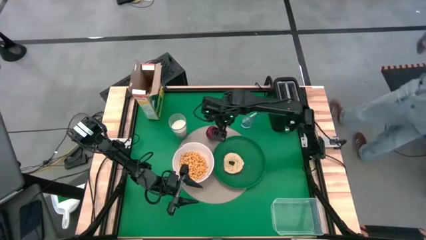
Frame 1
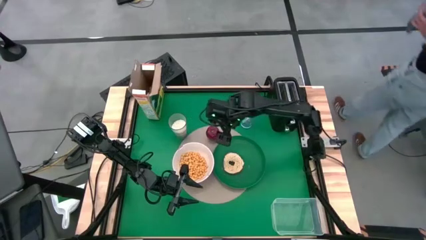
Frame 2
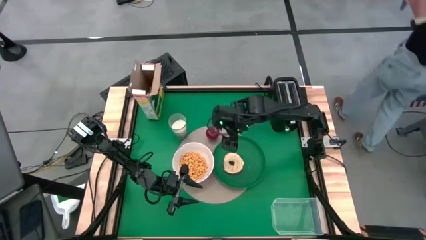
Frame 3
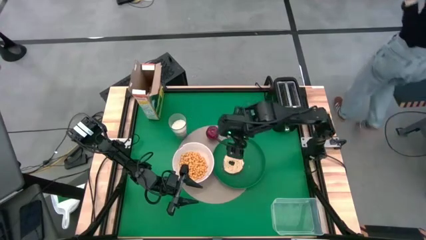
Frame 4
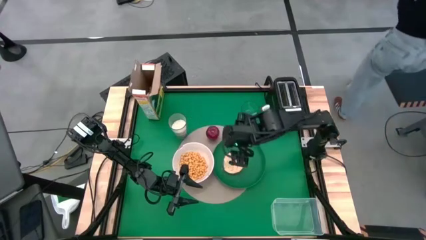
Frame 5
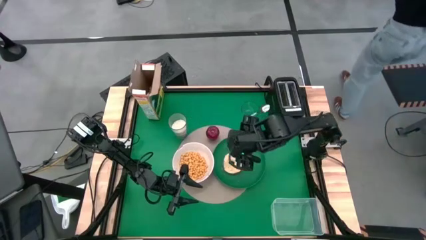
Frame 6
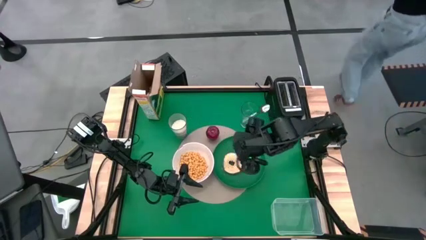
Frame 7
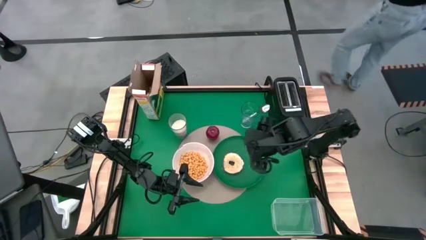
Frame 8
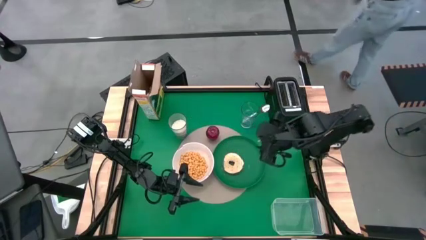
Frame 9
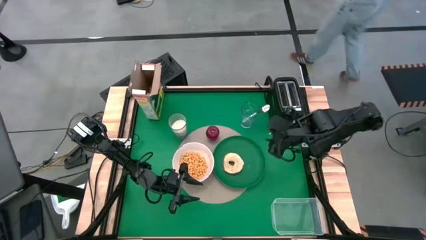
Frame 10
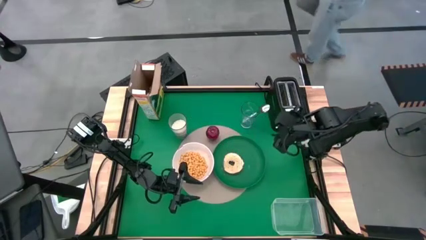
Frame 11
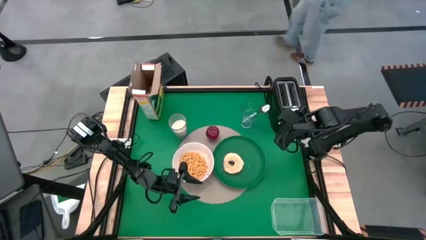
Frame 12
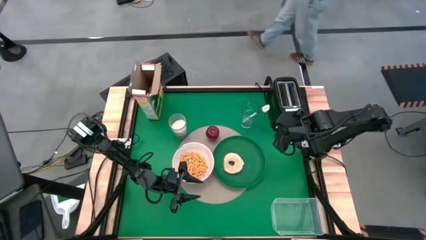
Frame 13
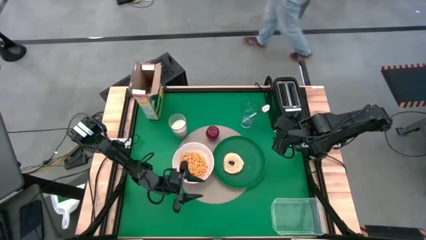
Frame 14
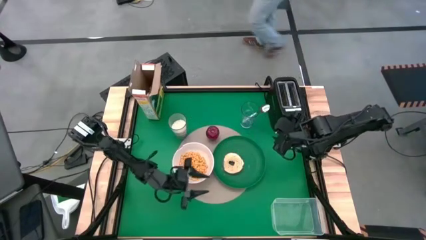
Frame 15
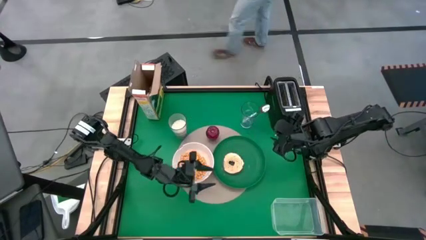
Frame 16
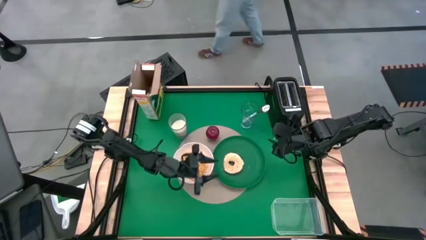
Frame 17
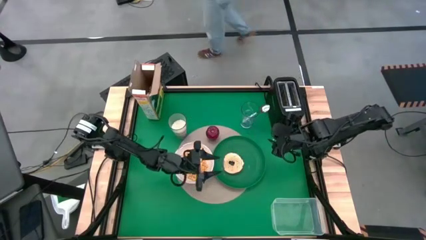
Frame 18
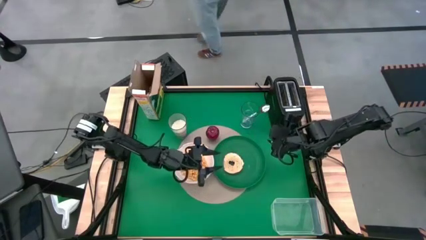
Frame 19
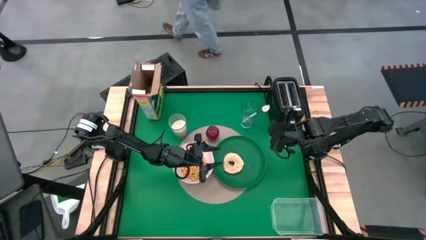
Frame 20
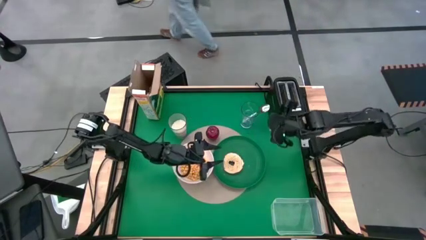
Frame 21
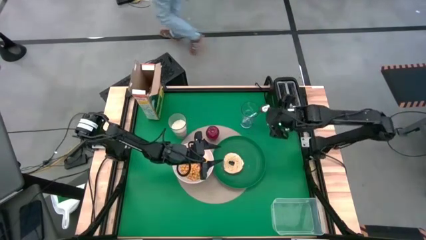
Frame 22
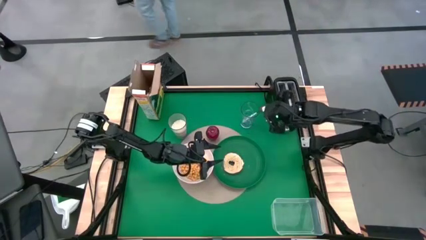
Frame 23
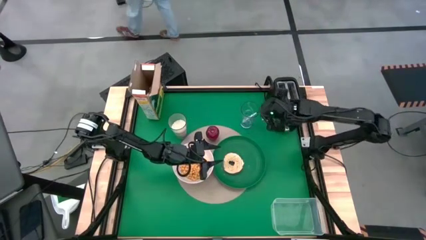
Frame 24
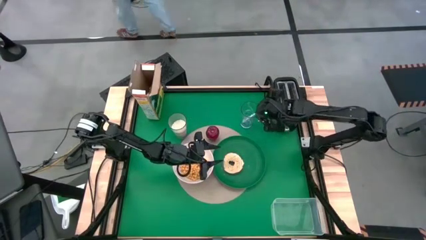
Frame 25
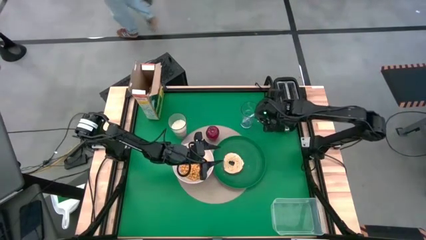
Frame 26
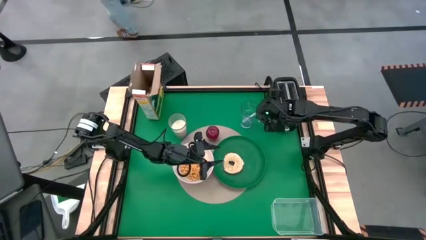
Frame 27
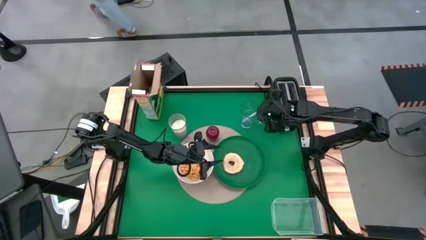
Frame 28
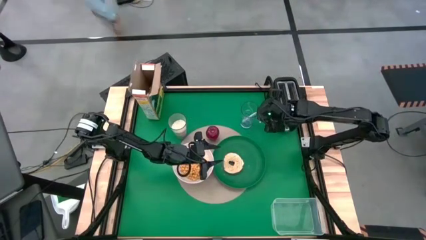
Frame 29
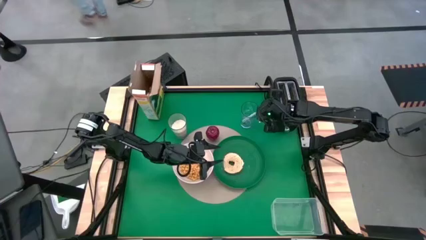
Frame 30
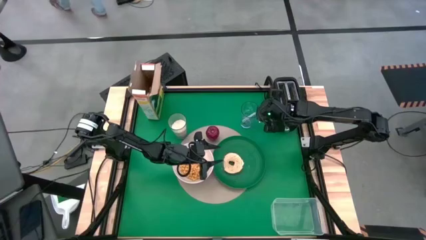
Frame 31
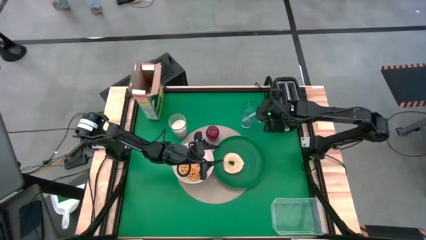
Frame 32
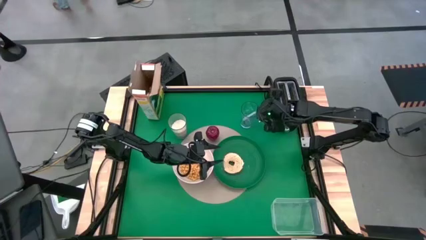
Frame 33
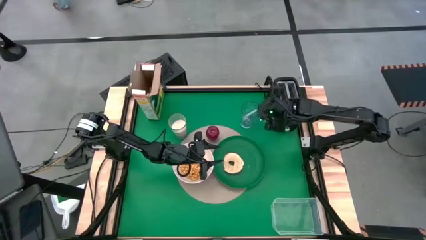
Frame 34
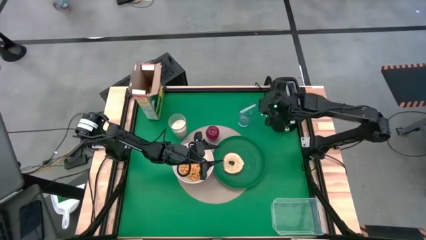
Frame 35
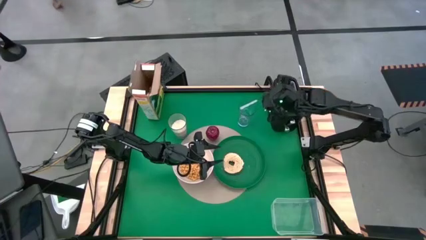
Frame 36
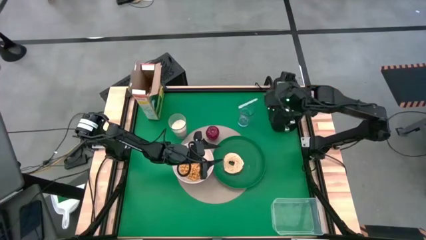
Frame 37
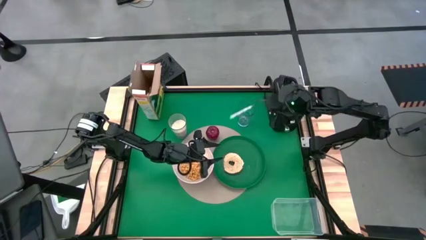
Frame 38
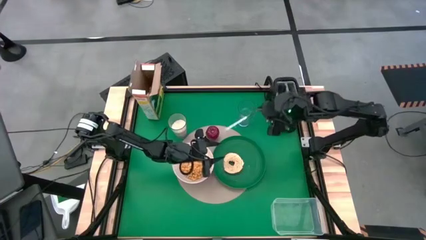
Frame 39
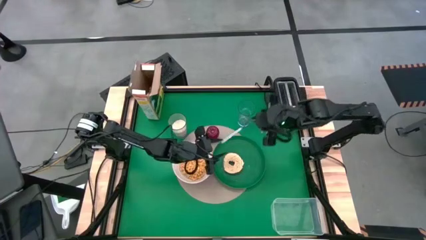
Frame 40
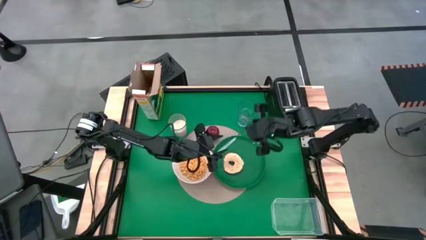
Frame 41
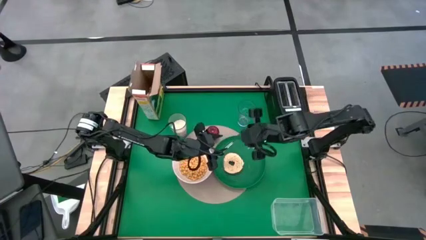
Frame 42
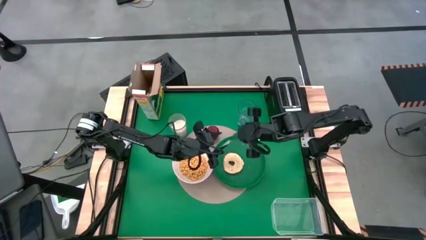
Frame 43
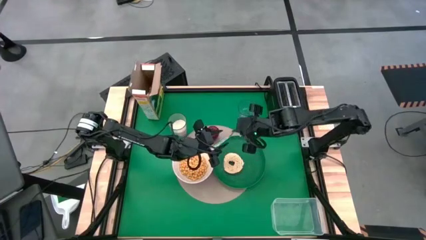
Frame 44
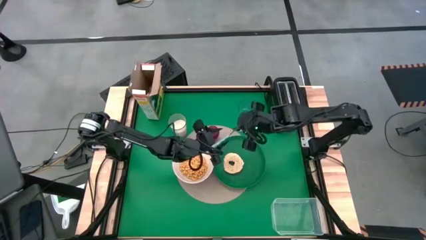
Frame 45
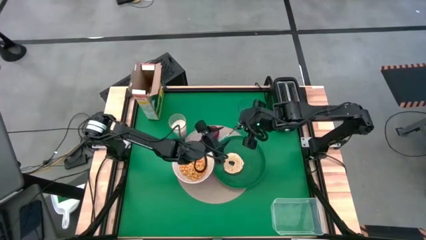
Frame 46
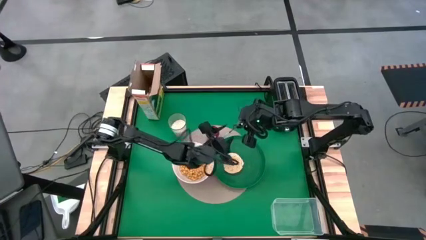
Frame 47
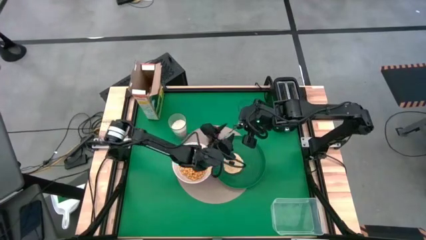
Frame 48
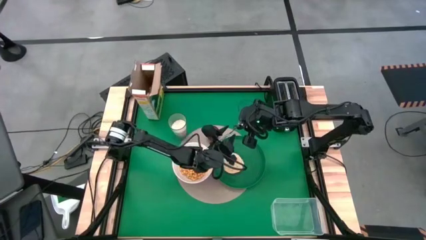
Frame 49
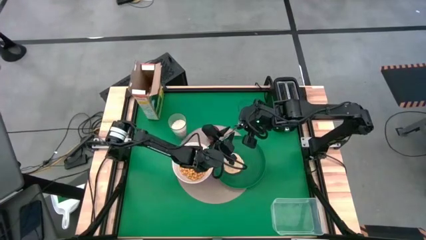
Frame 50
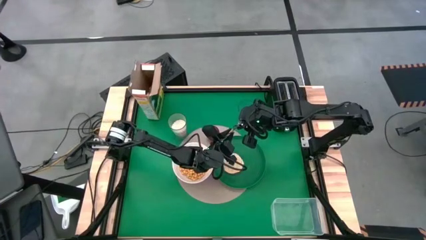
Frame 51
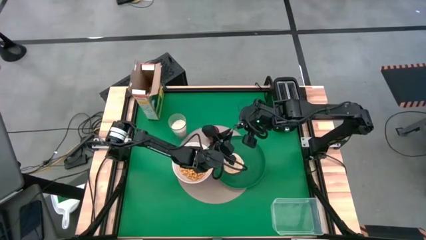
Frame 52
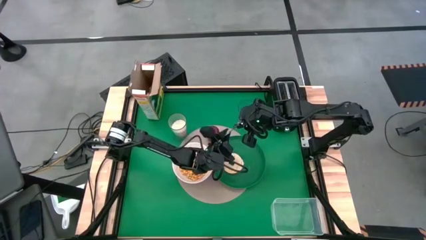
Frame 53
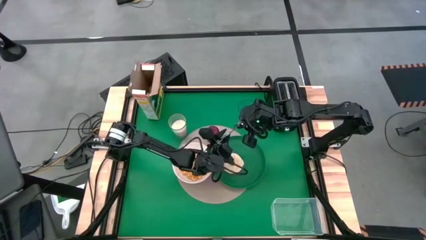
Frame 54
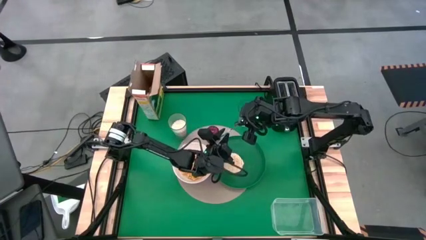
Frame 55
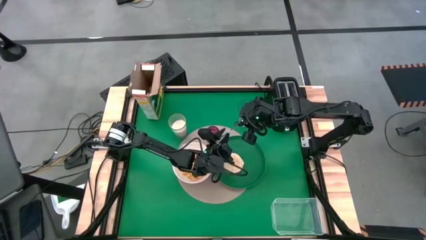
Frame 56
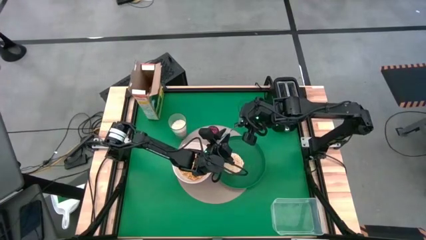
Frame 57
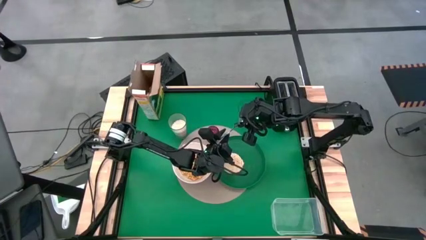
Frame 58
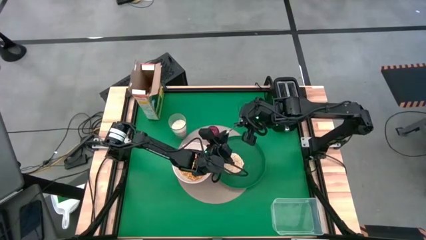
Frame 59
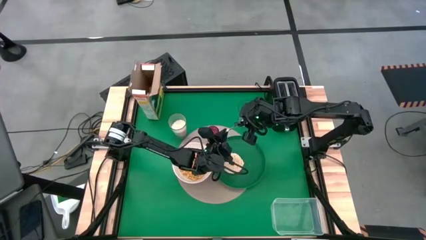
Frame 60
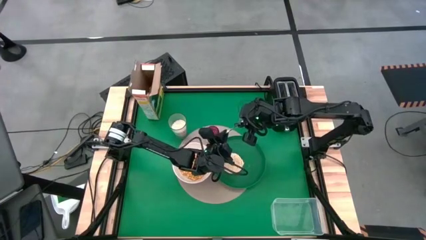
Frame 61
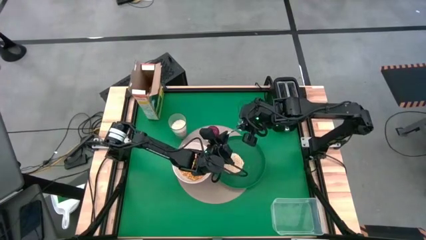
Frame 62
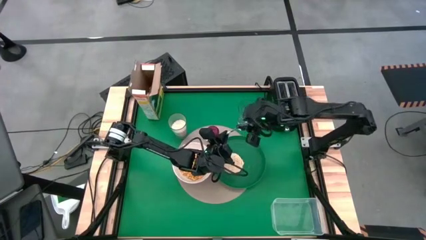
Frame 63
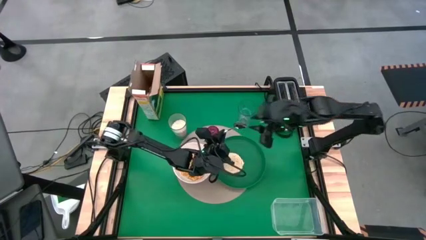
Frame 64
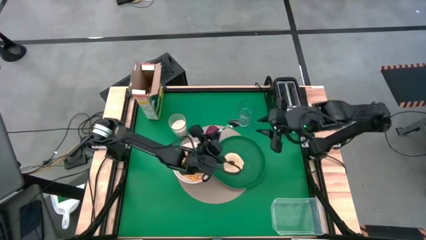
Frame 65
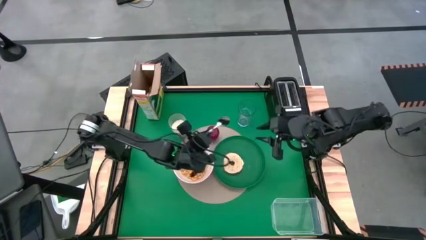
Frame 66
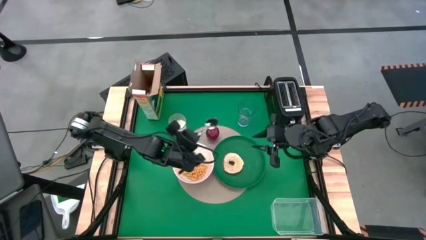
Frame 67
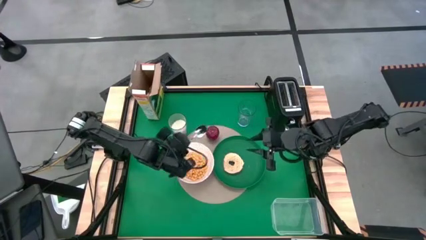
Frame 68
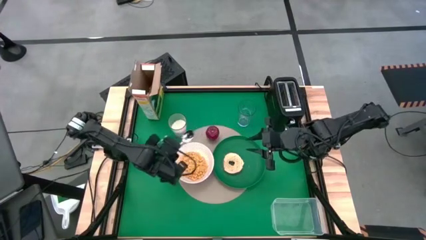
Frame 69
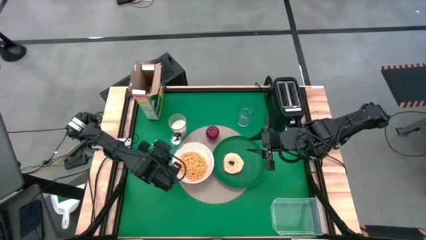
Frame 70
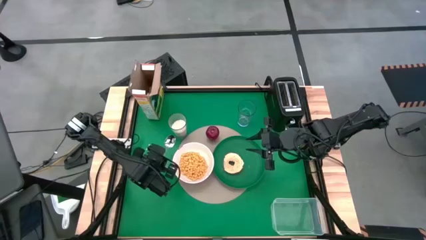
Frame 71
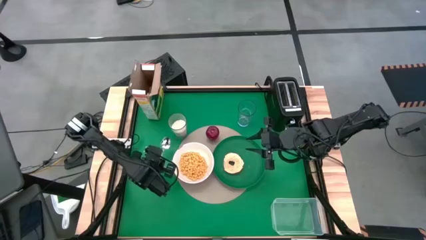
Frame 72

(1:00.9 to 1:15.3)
Task: Arrange a breakfast setting
Put the spoon on the table mat to the right of the bowl
